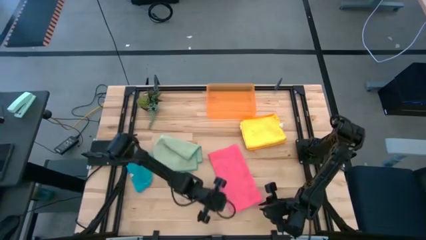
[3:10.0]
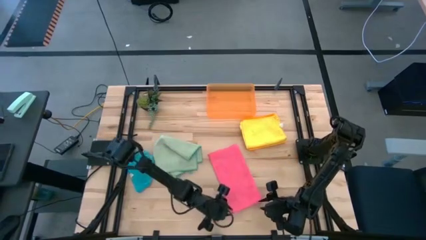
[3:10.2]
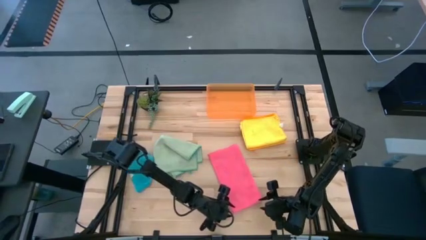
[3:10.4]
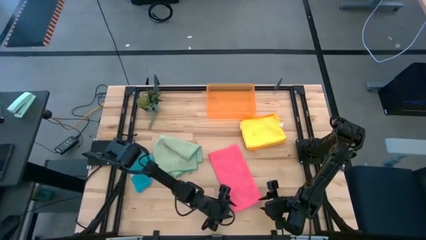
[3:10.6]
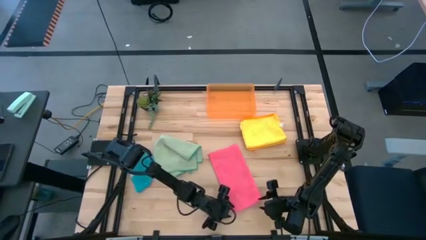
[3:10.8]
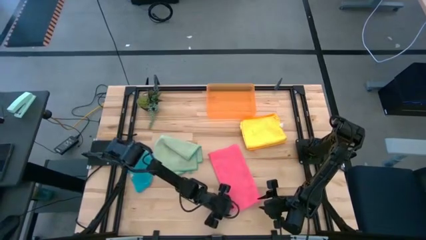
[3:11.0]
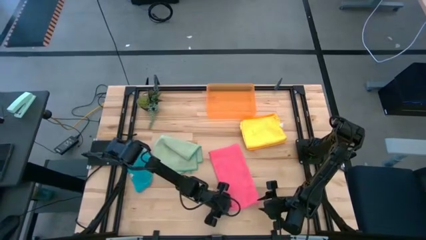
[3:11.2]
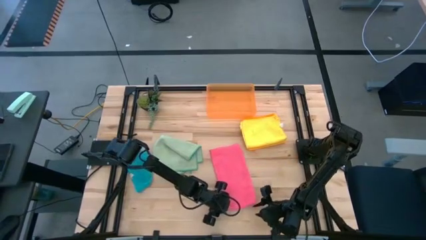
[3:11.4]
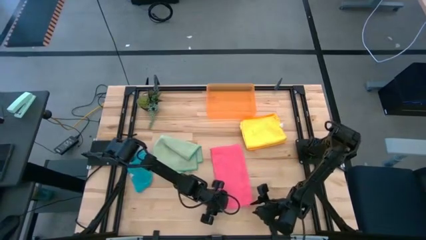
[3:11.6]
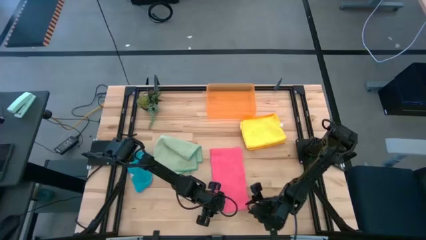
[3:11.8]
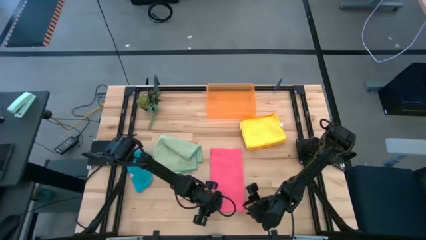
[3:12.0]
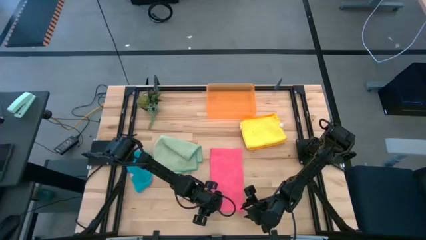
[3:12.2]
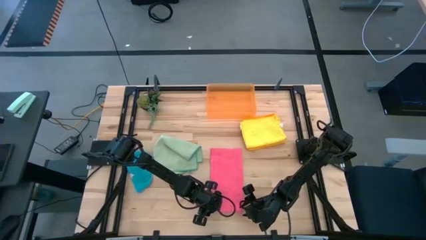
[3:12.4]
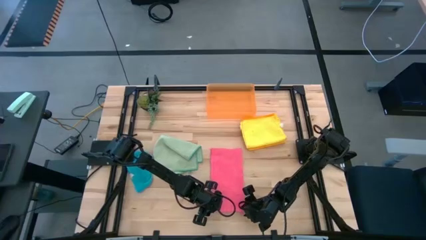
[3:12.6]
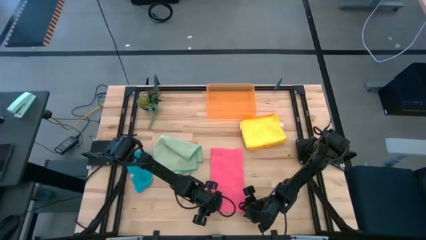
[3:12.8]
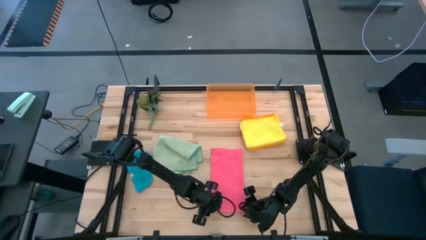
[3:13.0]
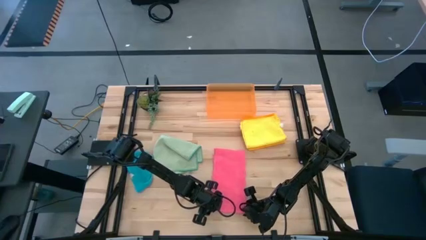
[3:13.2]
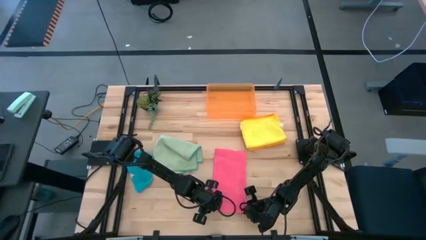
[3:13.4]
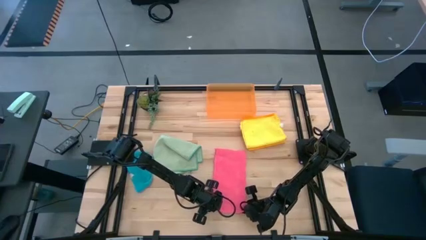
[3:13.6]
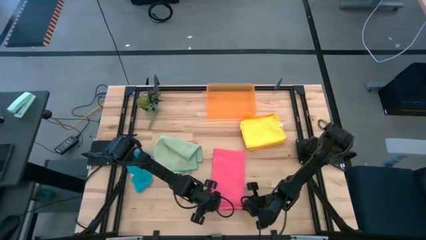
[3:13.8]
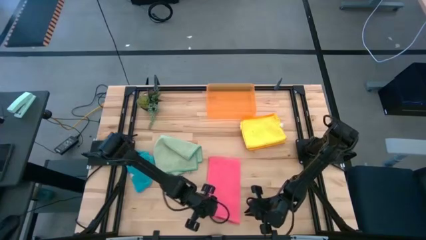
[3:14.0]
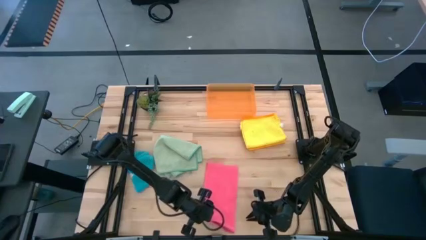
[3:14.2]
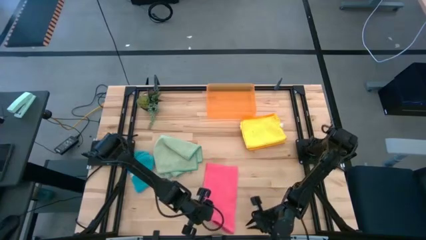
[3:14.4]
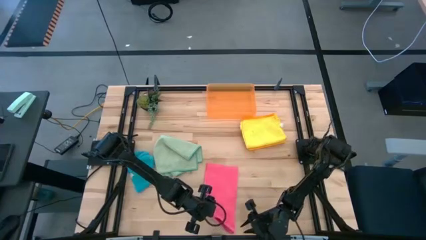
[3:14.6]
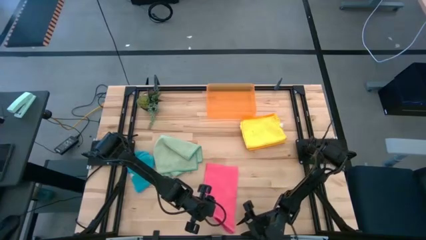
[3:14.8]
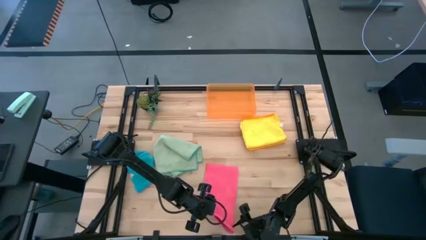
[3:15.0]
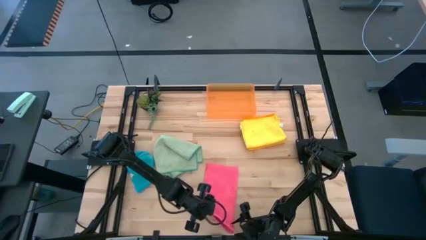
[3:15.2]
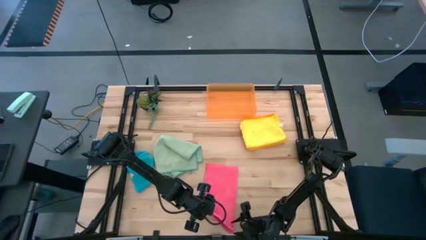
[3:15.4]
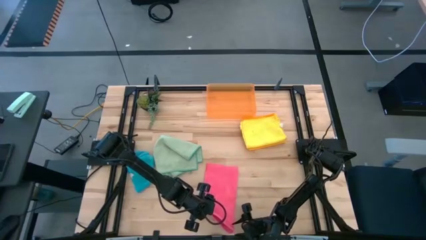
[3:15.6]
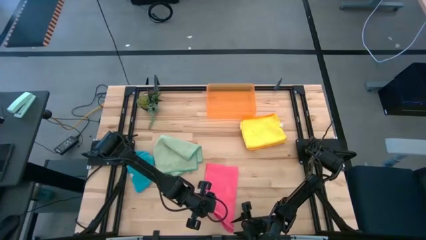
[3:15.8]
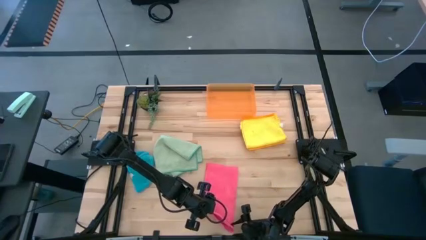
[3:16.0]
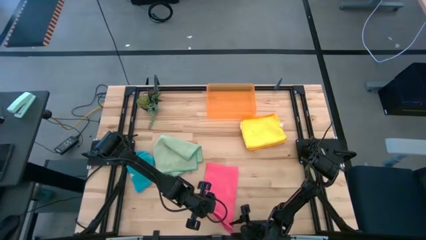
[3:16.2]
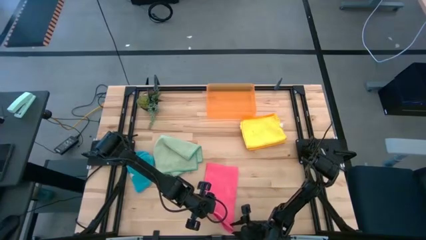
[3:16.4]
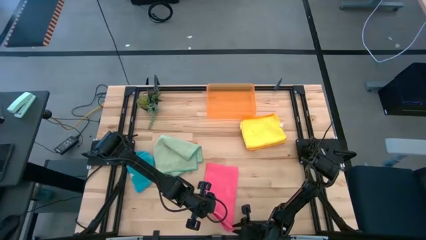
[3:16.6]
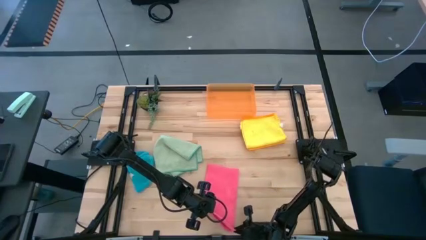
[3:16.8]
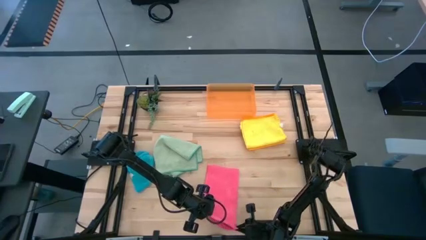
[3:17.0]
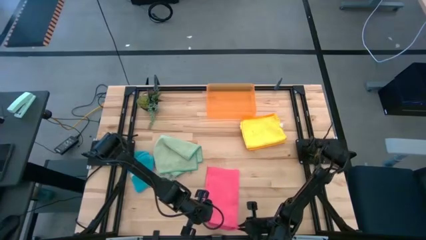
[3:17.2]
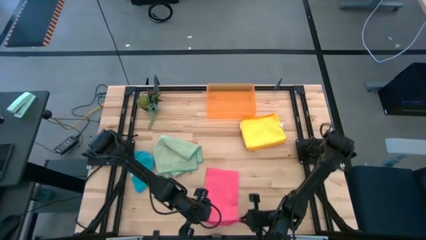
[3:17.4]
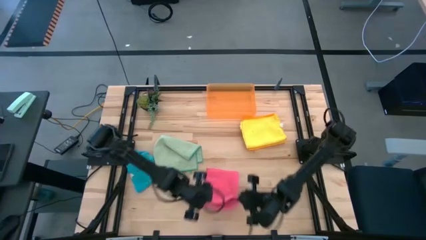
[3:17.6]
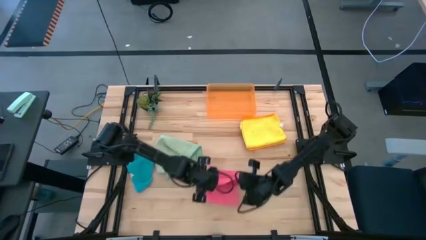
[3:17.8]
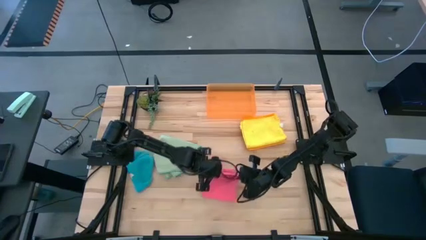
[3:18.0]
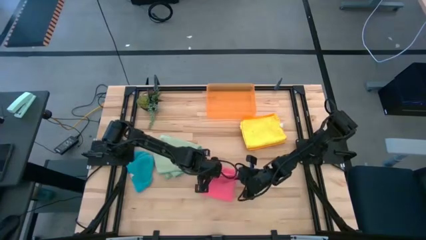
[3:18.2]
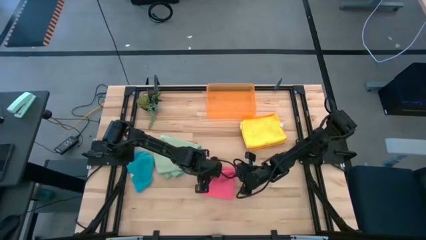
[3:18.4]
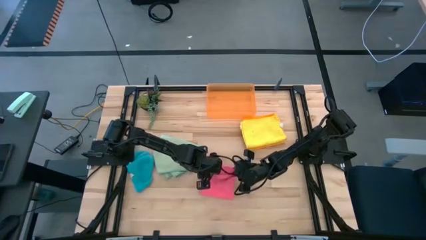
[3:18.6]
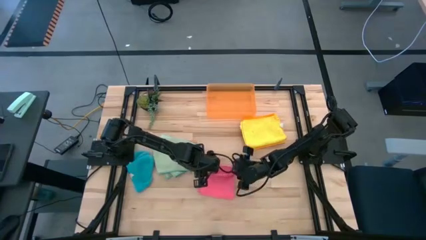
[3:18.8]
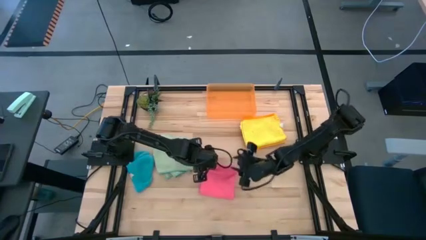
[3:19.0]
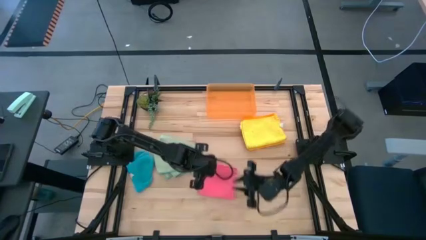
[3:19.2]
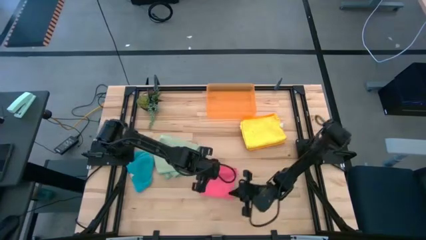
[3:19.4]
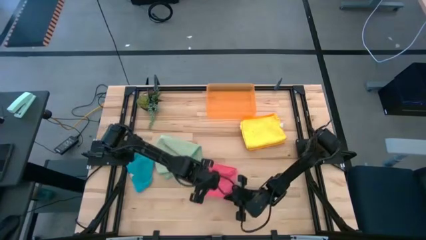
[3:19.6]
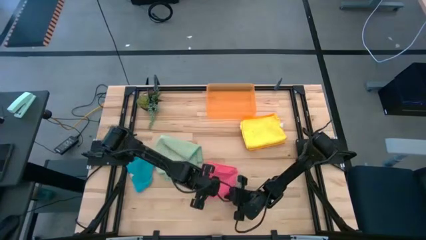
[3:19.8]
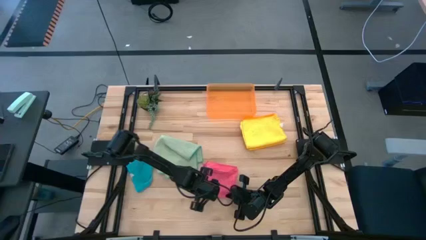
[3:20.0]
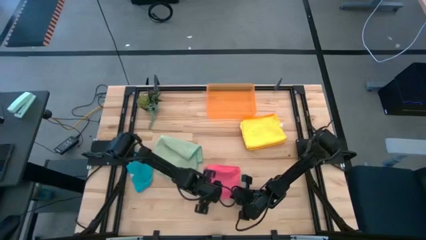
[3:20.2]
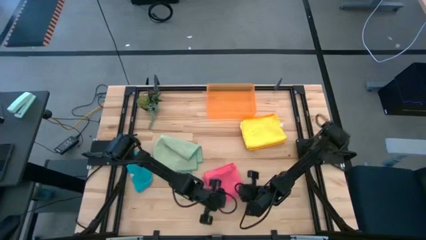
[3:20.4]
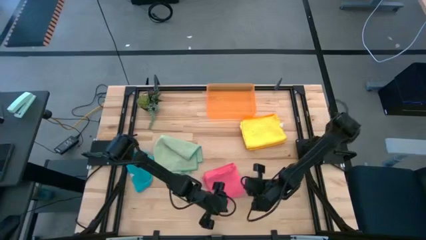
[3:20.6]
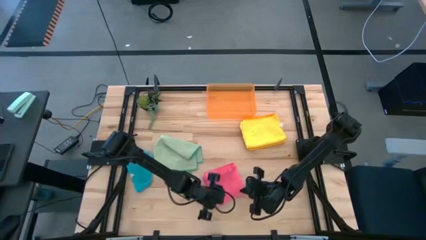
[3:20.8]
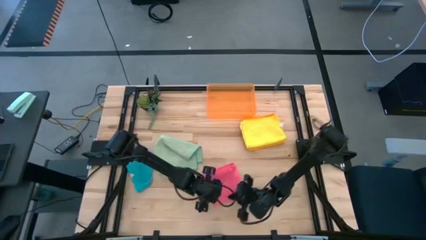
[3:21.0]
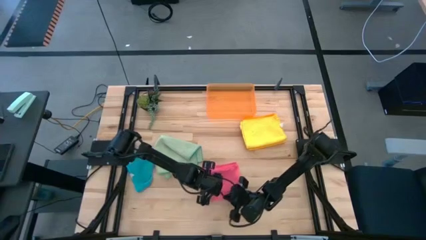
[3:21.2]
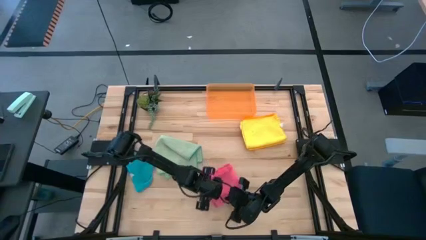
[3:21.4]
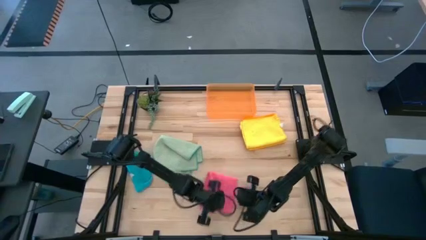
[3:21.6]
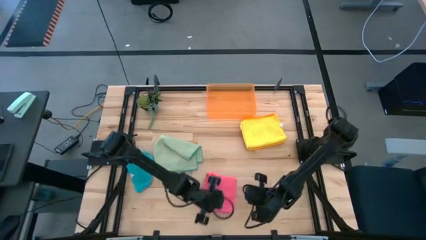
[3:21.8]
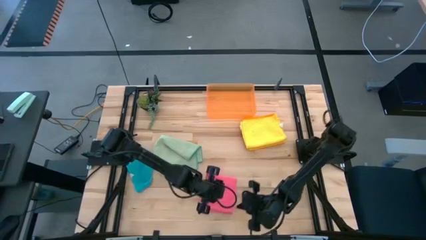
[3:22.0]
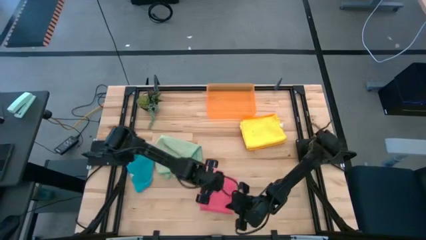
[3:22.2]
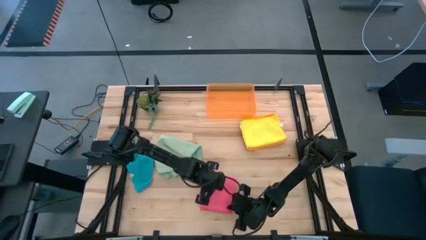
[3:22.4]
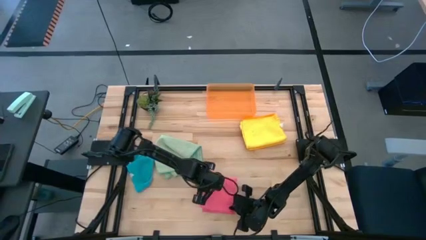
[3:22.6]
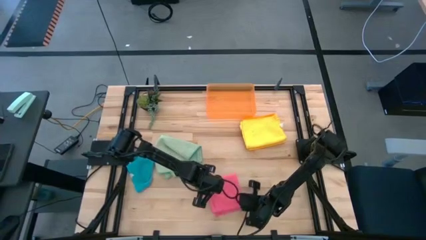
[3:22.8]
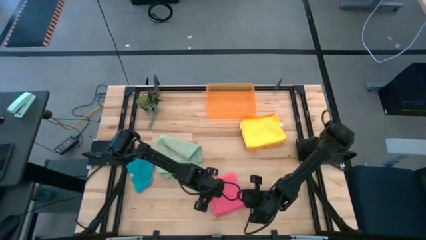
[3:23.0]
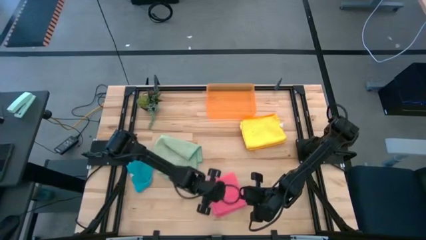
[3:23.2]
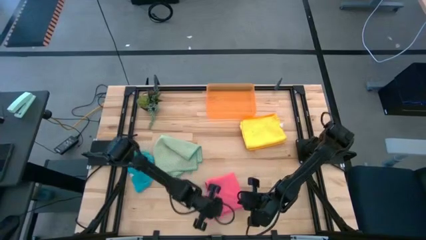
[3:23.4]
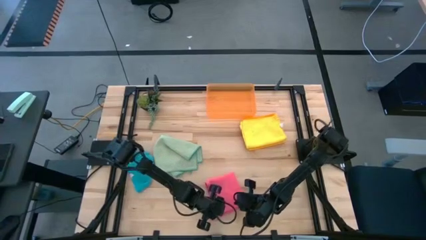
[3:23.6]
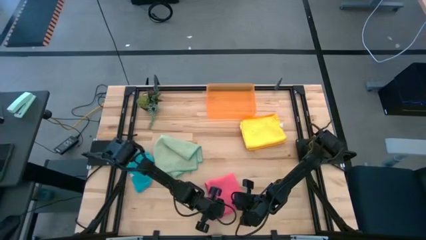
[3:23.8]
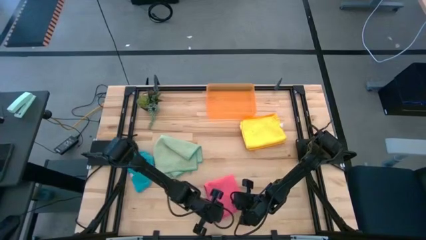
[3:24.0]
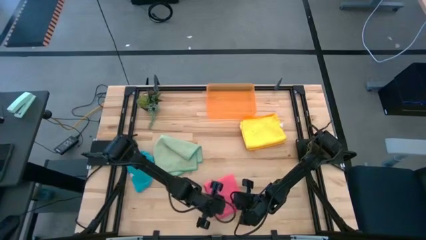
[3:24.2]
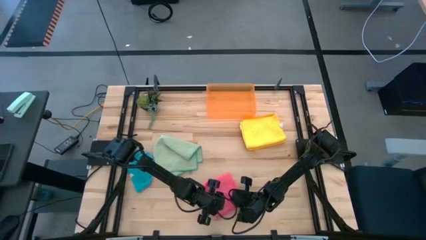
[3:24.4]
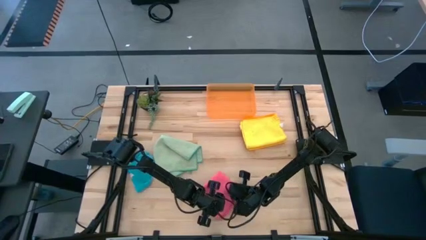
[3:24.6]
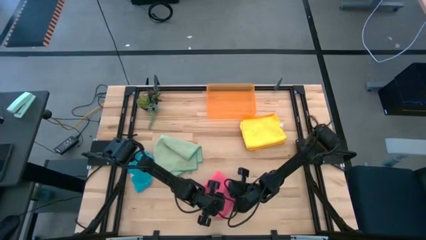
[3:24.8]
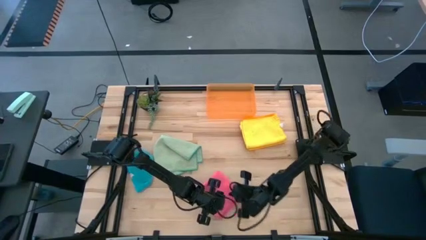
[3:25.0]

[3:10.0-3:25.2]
Task: Fold microfiber towels
Fold the pink microfiber cloth

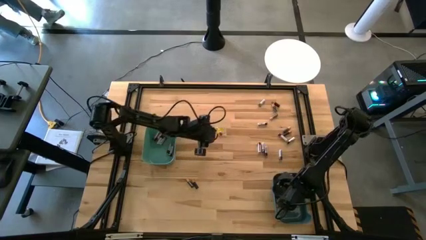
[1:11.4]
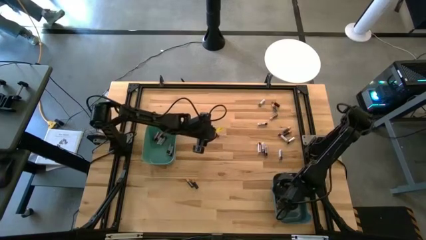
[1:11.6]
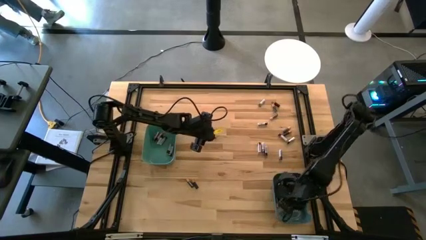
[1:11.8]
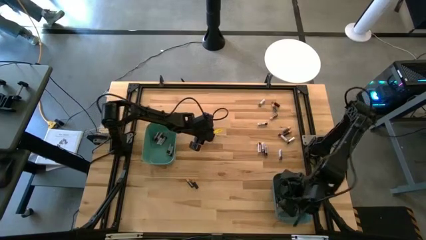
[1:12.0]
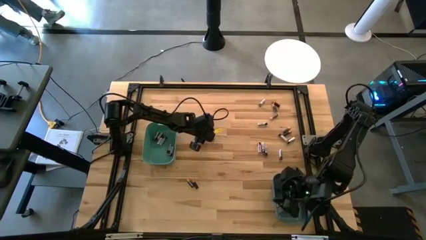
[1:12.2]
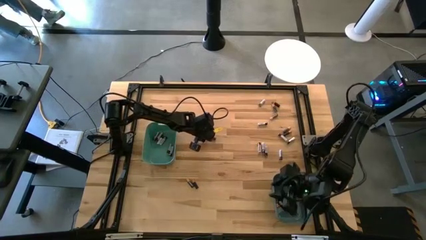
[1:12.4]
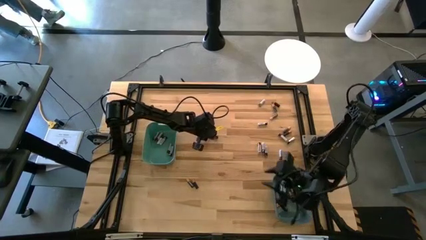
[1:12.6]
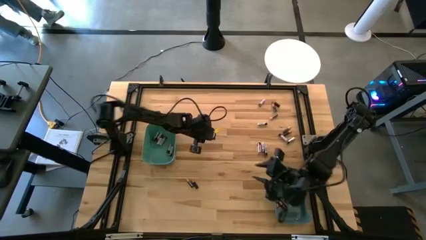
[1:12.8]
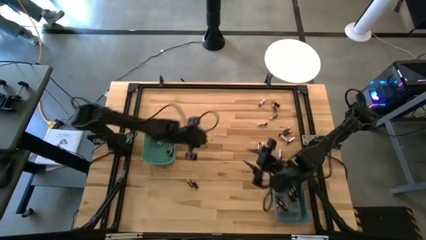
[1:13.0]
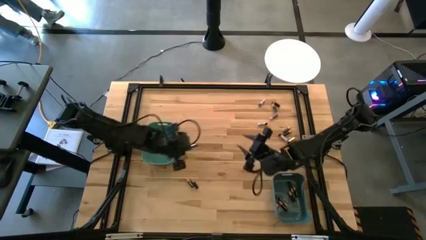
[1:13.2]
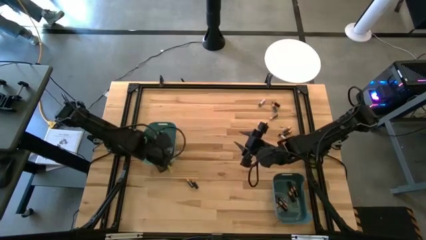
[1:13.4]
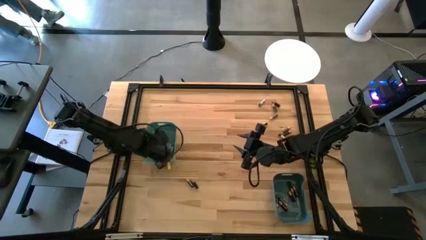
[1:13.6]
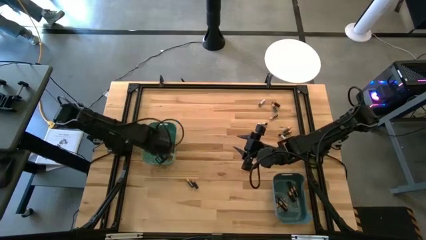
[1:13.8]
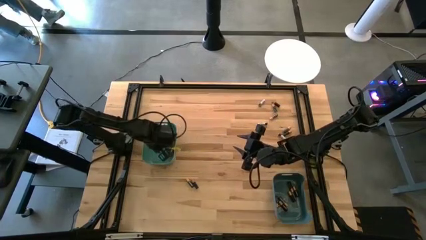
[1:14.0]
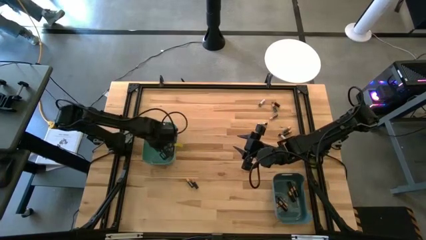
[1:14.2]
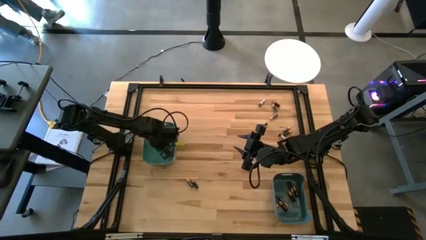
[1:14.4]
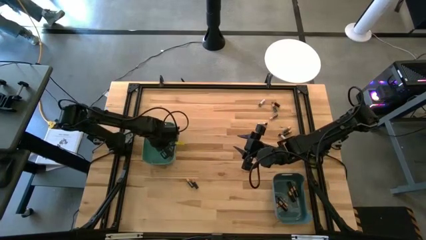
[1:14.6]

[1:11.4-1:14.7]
Task: Sort batteries
Put the silver battery into the green bin
